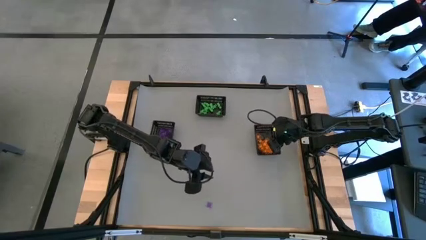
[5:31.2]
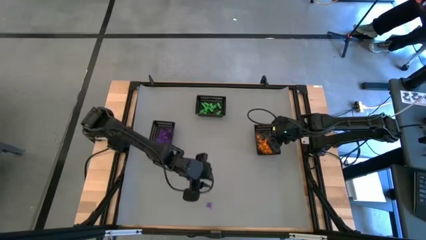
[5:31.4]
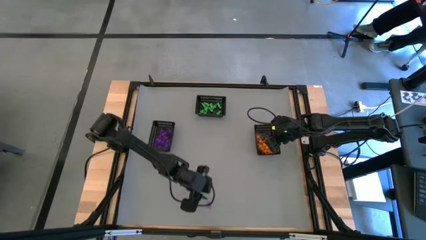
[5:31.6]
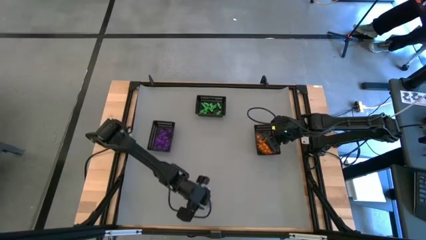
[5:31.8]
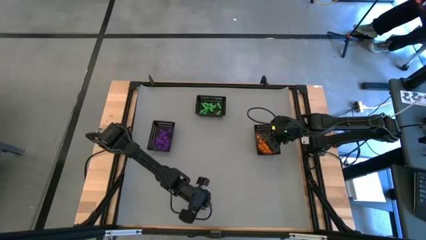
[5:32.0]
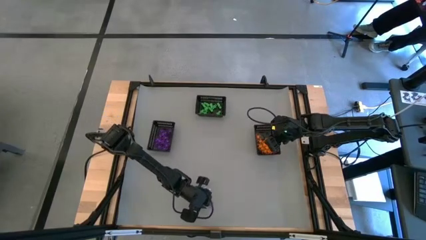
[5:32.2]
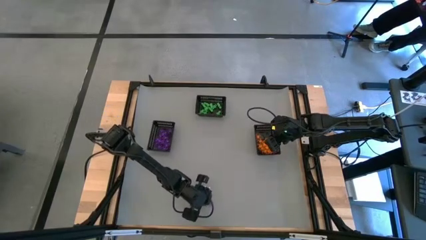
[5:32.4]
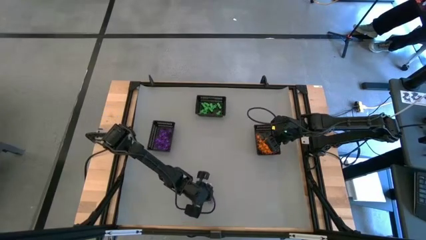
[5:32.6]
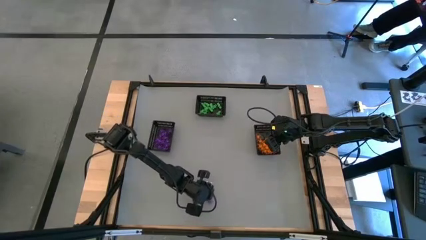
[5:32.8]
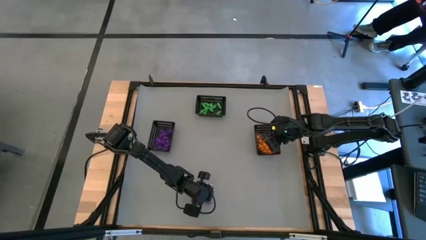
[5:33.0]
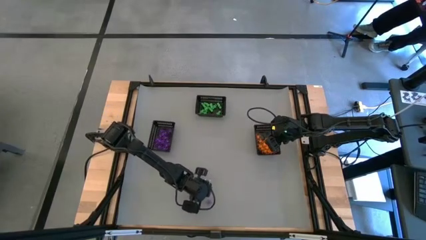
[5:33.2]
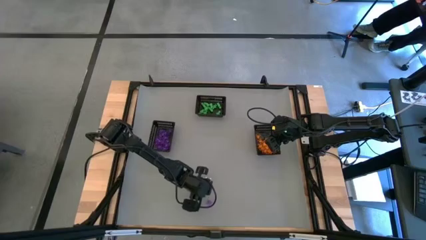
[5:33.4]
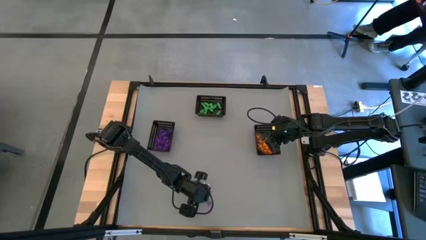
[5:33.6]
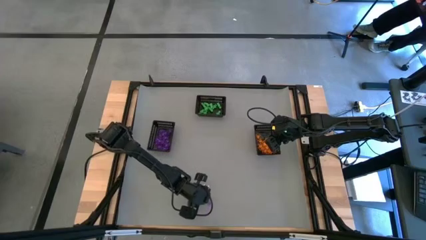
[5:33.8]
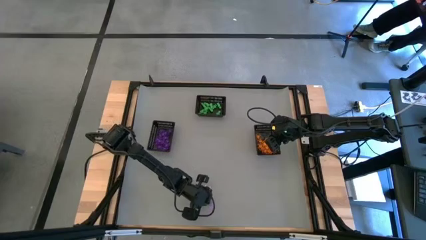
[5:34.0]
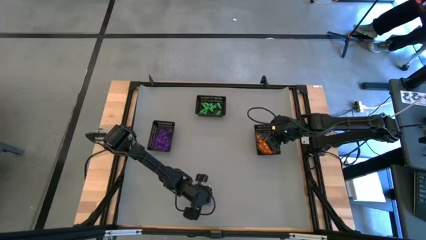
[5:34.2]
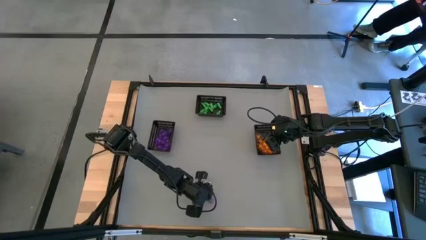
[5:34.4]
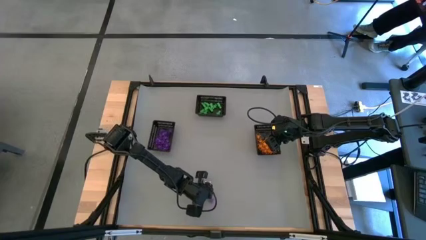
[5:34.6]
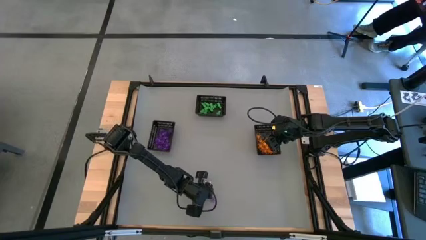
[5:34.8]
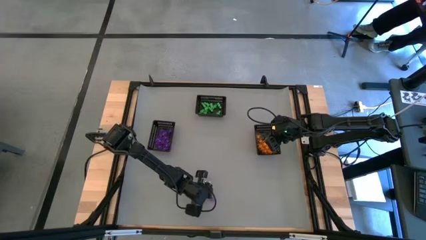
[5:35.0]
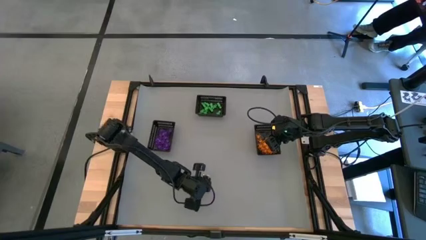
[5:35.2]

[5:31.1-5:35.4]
Task: Sort Halloween decoration
Put the violet spider toy into the left bin

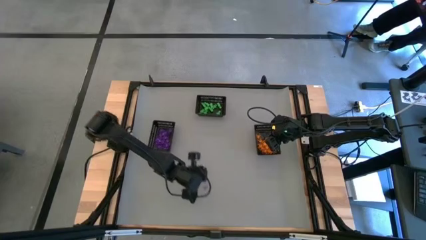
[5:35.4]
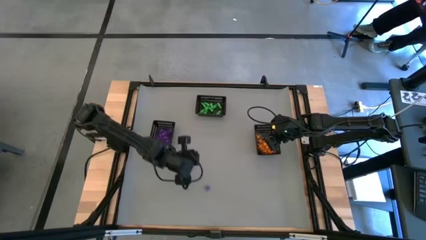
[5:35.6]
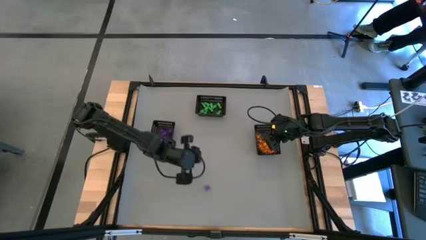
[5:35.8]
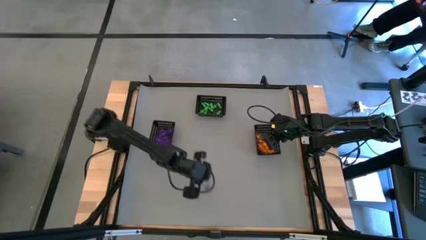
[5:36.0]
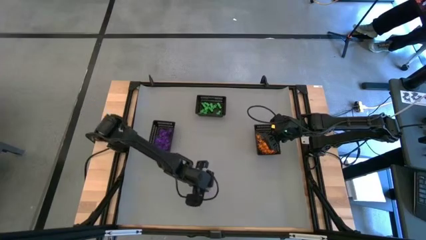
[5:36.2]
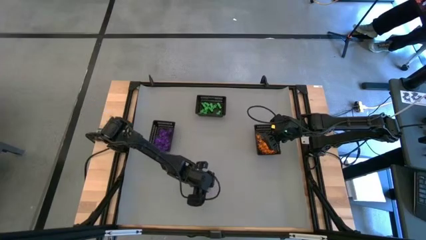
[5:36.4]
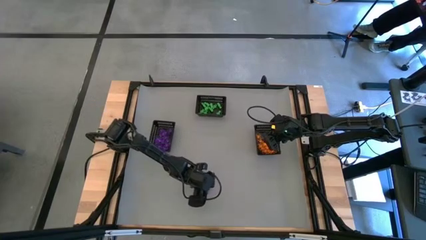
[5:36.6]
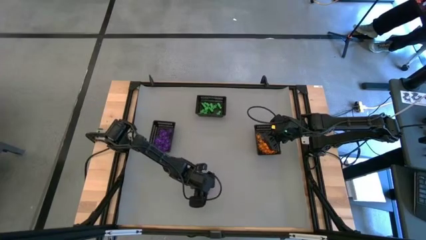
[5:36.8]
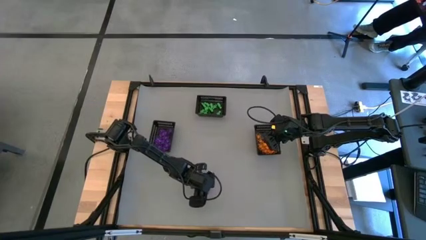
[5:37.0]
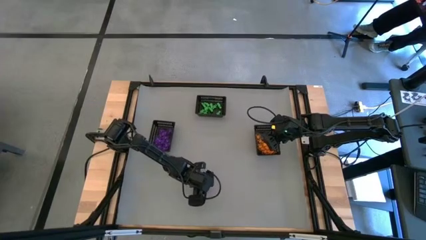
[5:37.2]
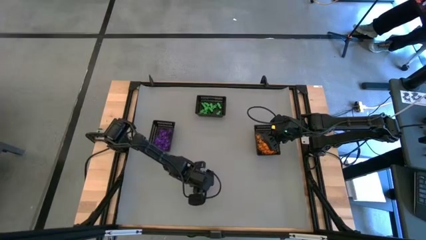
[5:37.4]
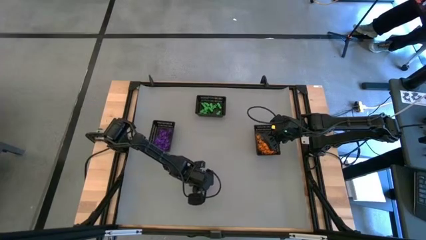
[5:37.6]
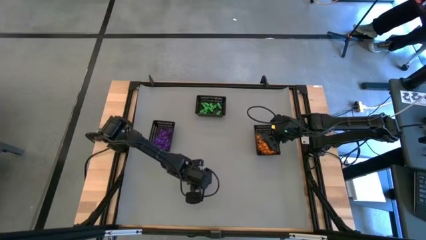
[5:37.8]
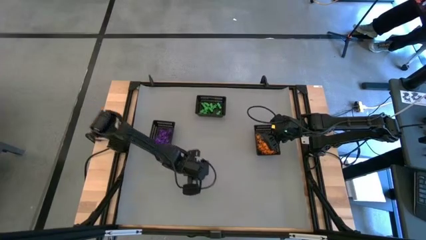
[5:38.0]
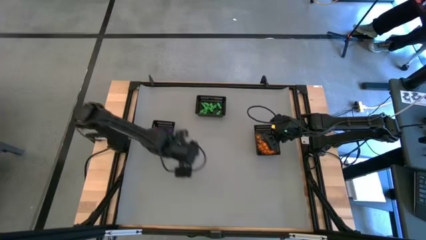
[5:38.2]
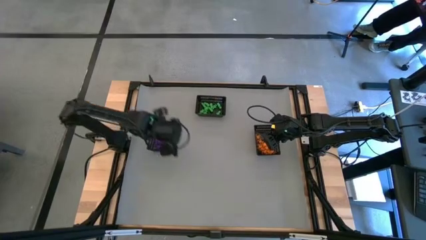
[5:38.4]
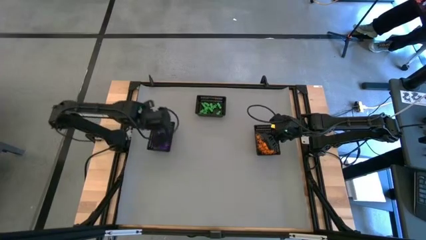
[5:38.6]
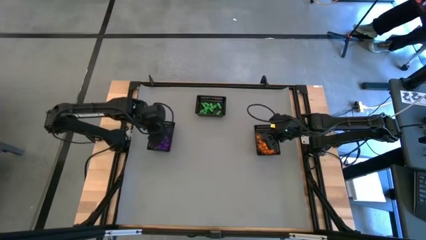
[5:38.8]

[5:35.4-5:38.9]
Put the violet spider toy into the left bin

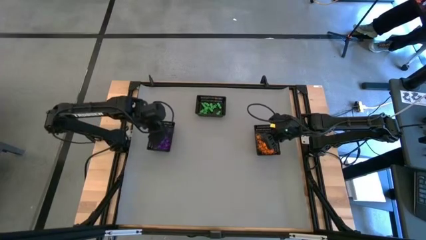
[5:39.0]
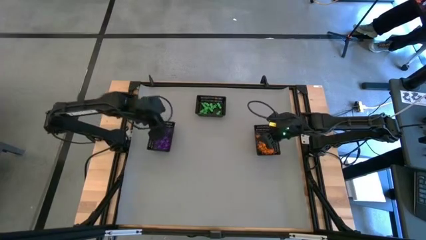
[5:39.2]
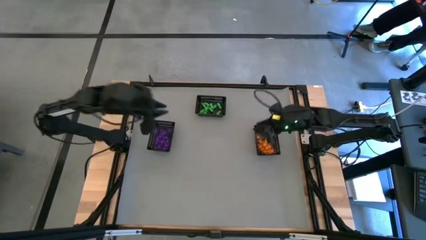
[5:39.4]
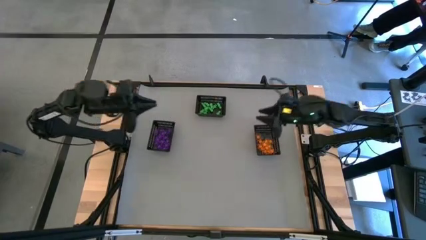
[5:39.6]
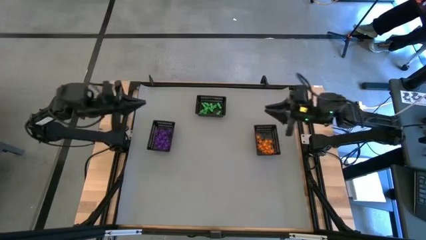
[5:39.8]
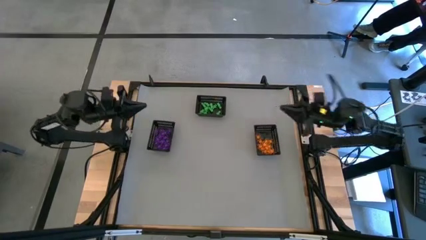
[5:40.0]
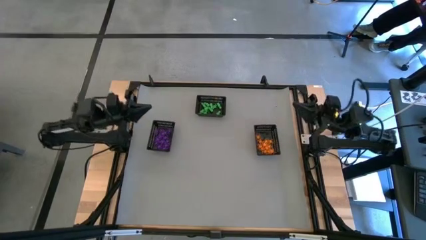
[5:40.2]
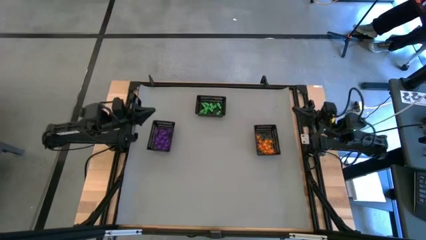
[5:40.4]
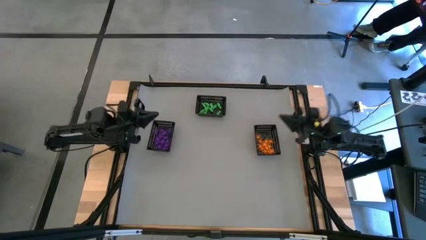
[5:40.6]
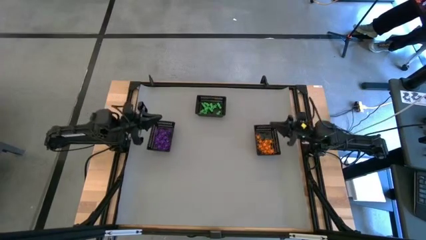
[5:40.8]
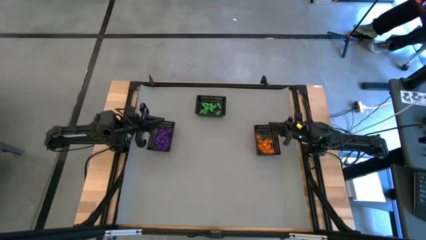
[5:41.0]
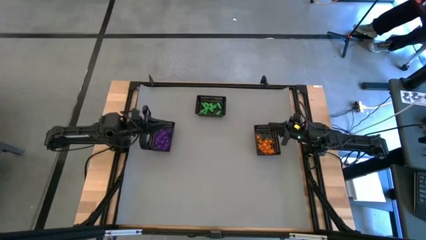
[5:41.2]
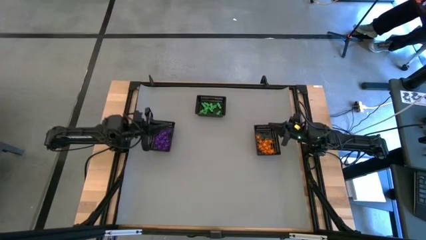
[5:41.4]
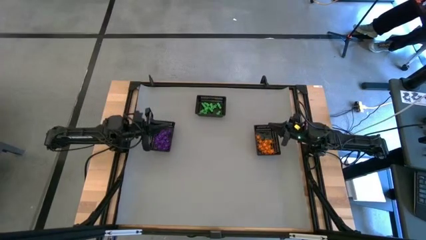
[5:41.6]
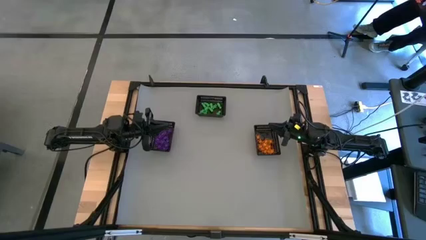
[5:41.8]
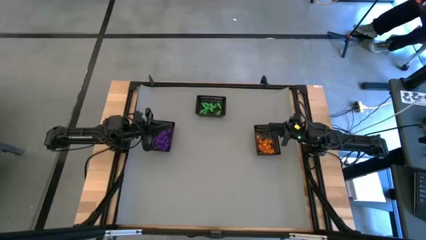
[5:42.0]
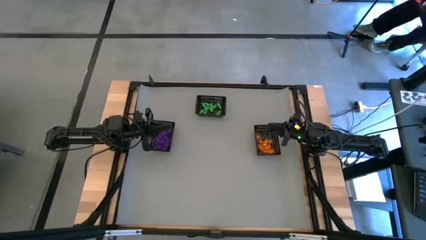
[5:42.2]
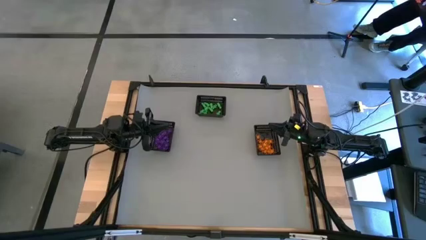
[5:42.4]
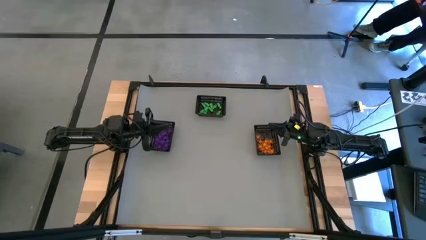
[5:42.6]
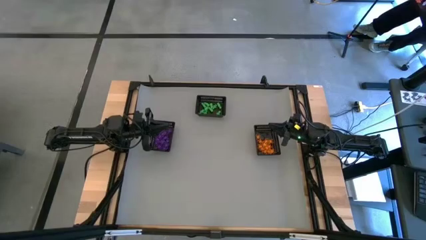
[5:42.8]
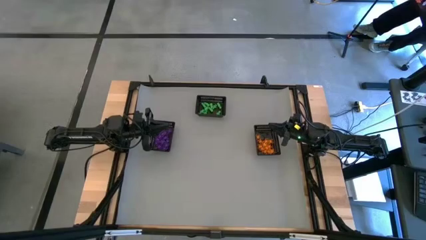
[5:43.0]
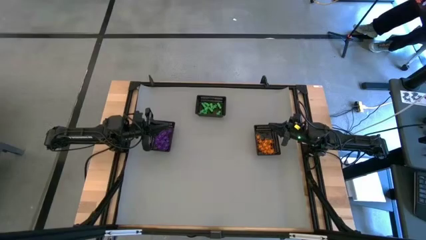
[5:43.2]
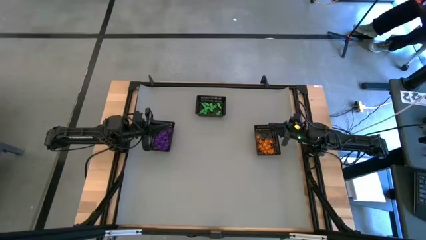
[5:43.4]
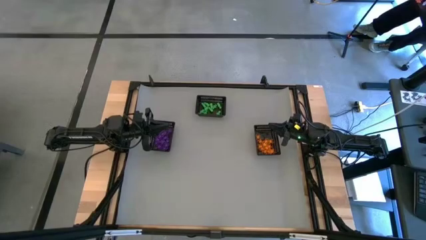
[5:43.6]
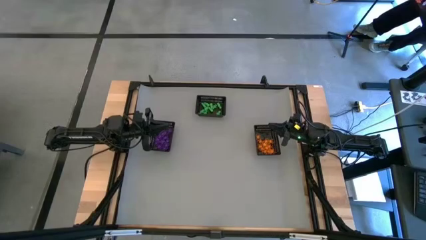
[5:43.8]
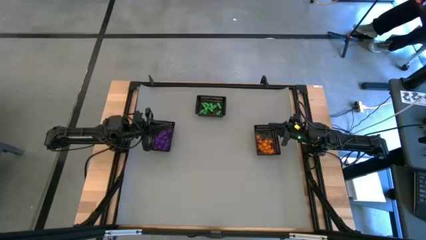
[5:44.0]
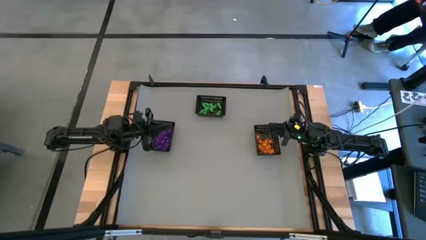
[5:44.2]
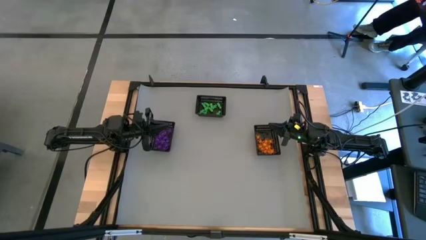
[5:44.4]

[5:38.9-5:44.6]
Return to Home Position
